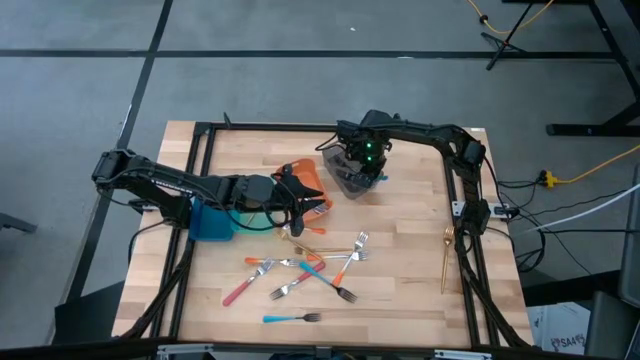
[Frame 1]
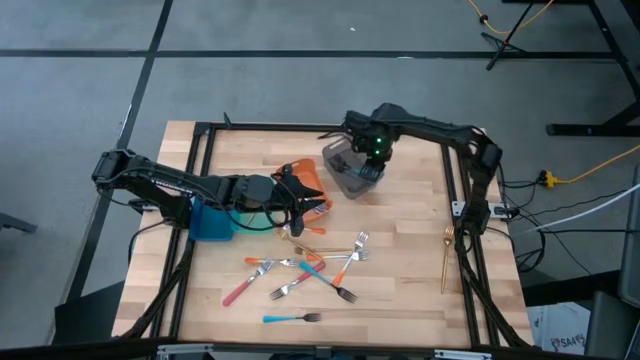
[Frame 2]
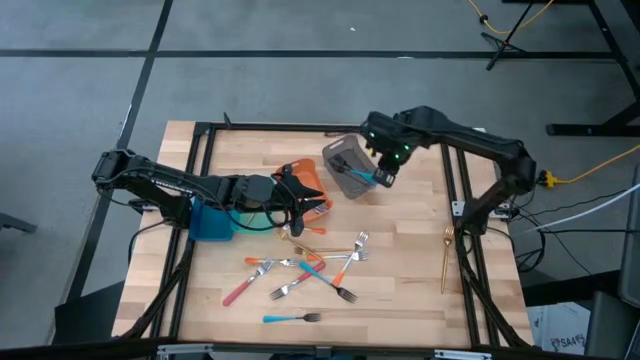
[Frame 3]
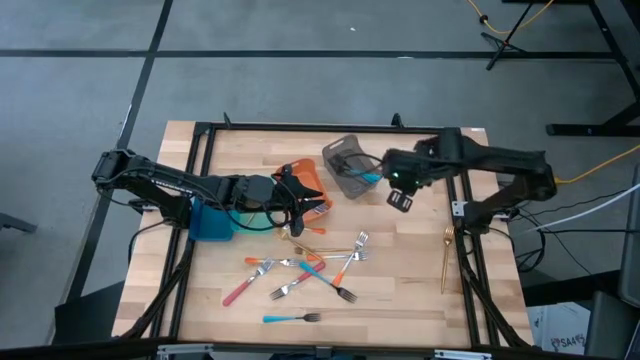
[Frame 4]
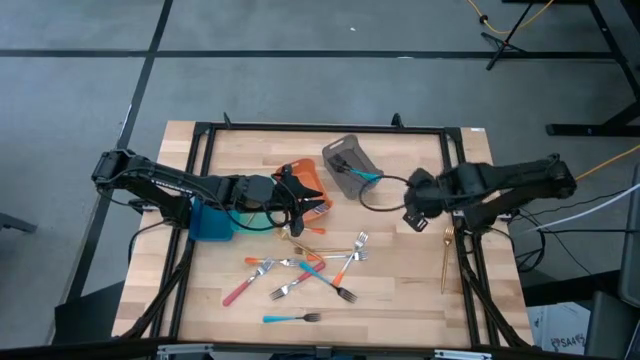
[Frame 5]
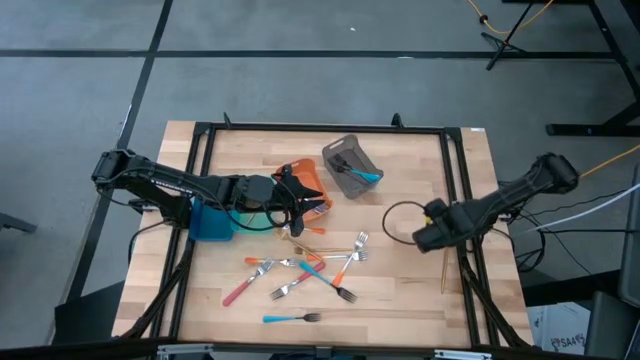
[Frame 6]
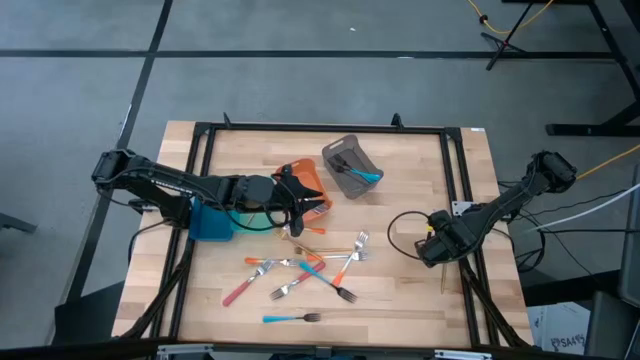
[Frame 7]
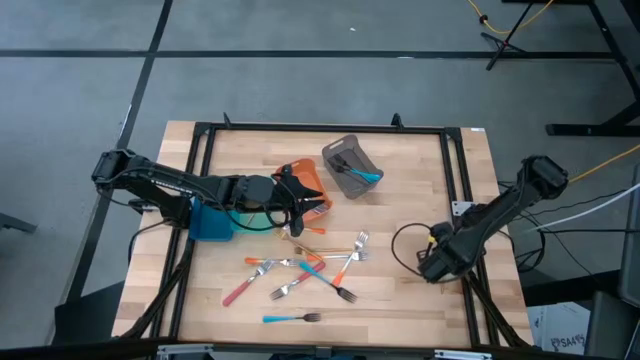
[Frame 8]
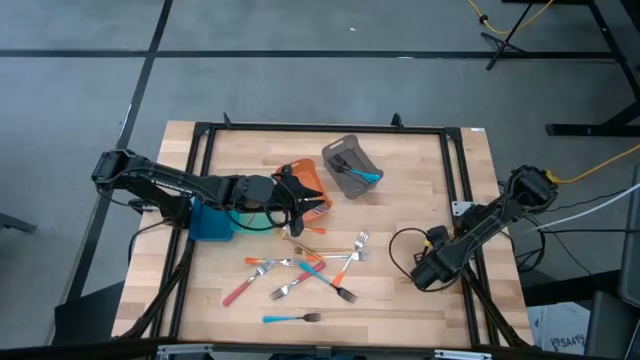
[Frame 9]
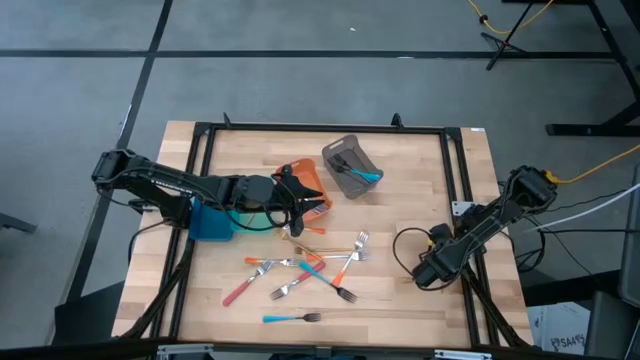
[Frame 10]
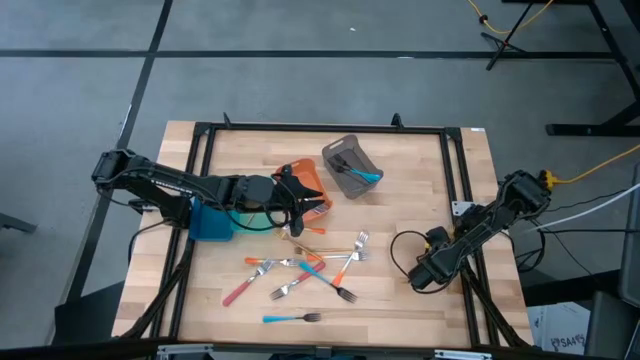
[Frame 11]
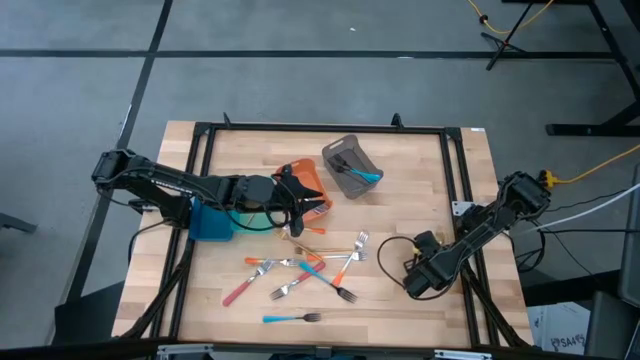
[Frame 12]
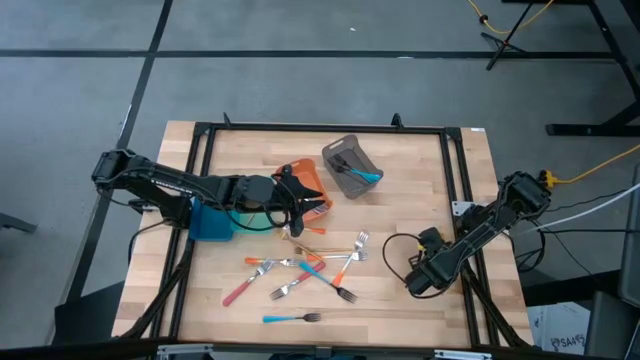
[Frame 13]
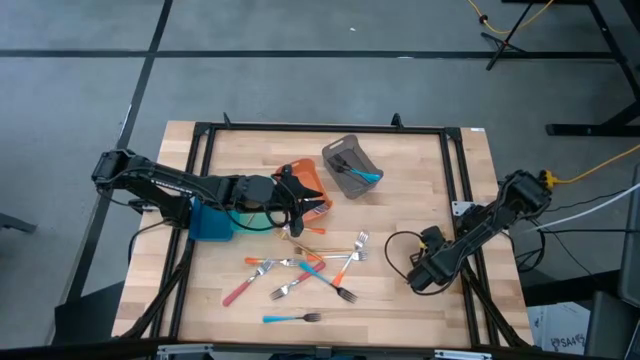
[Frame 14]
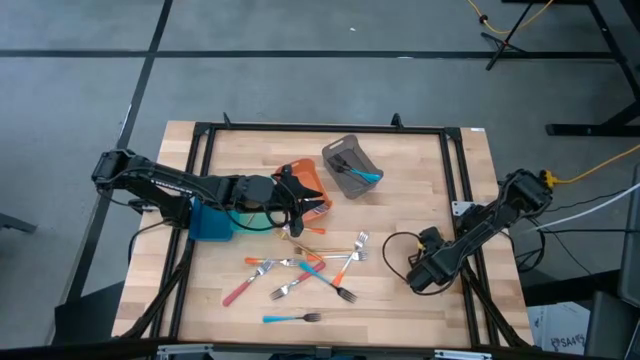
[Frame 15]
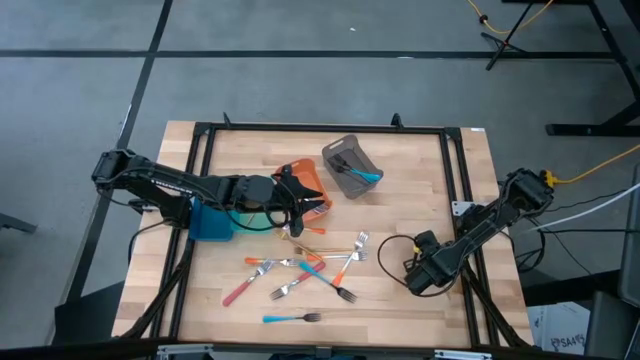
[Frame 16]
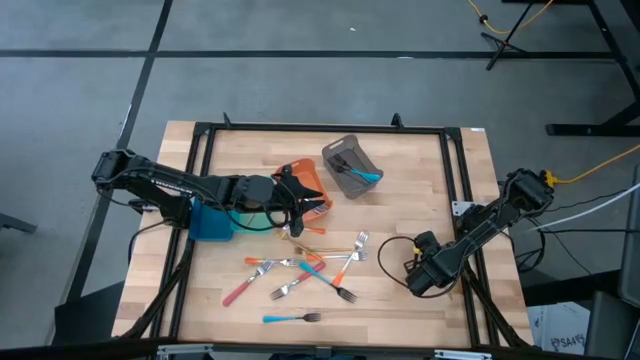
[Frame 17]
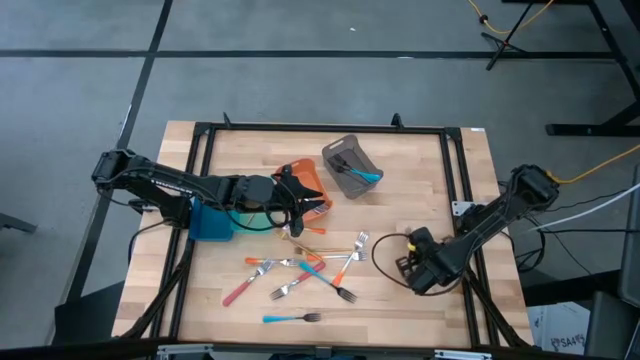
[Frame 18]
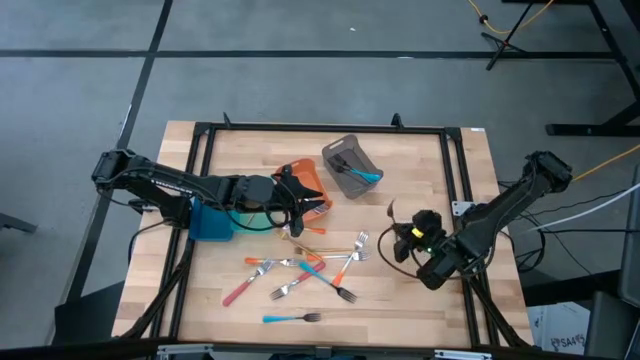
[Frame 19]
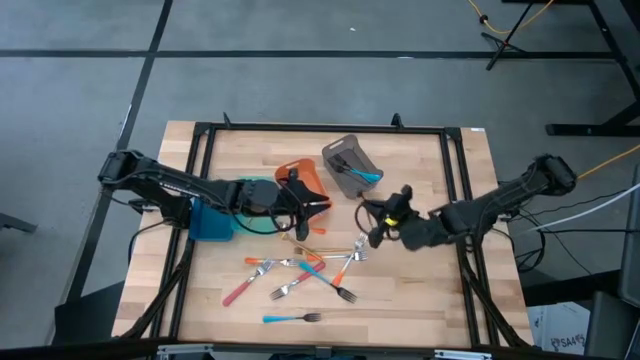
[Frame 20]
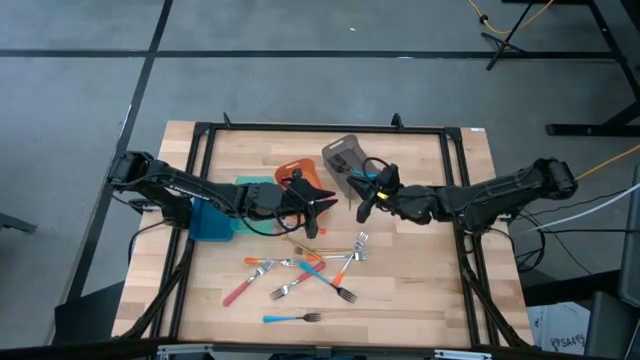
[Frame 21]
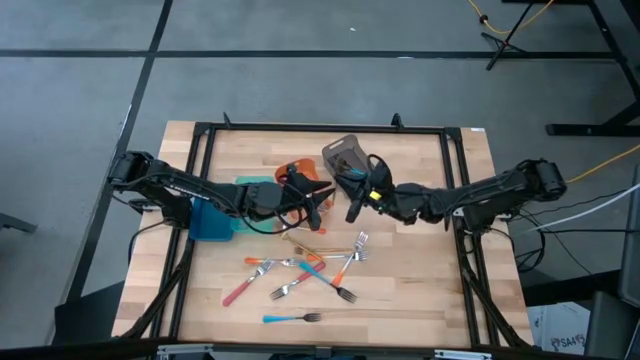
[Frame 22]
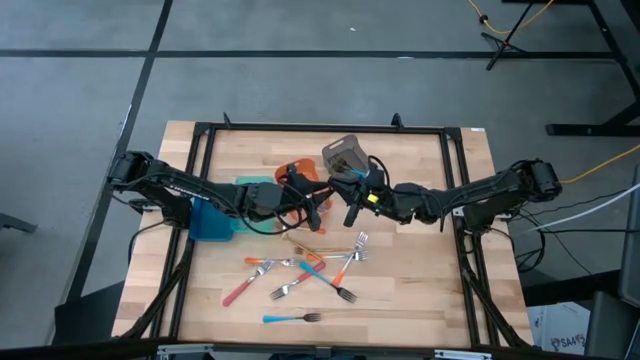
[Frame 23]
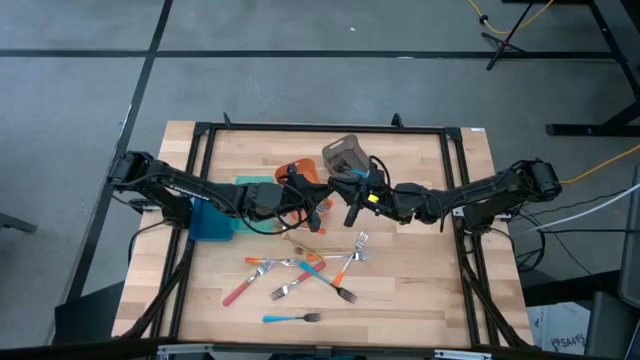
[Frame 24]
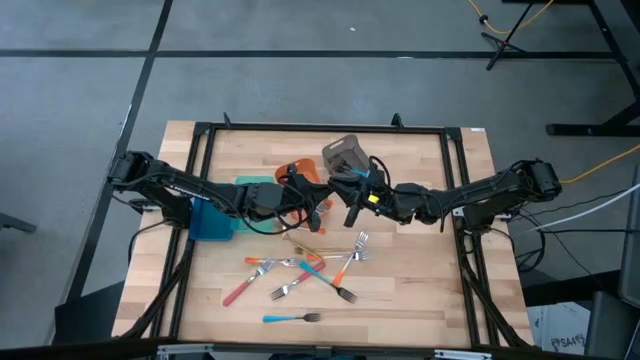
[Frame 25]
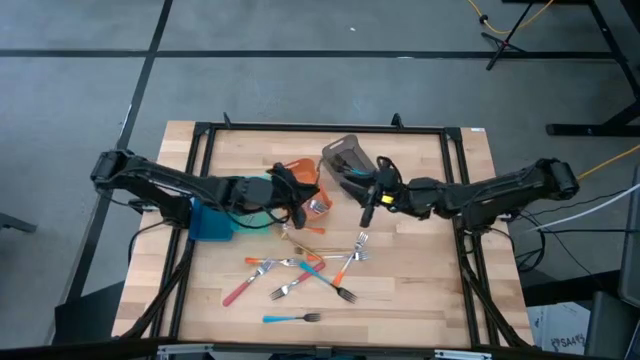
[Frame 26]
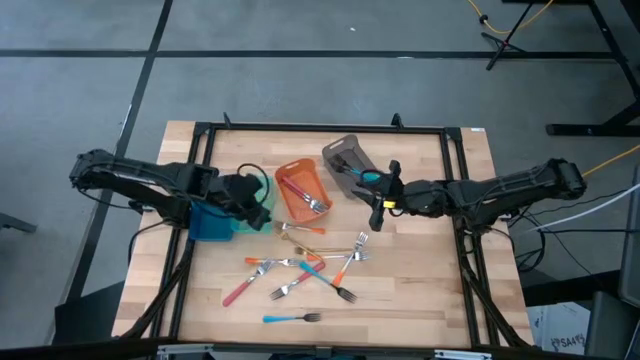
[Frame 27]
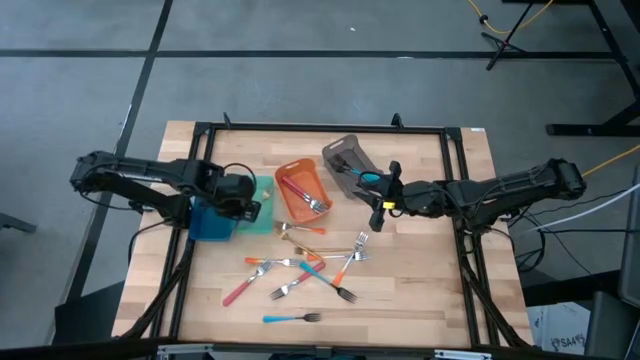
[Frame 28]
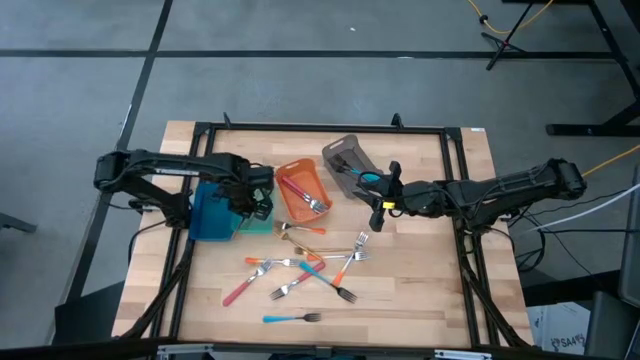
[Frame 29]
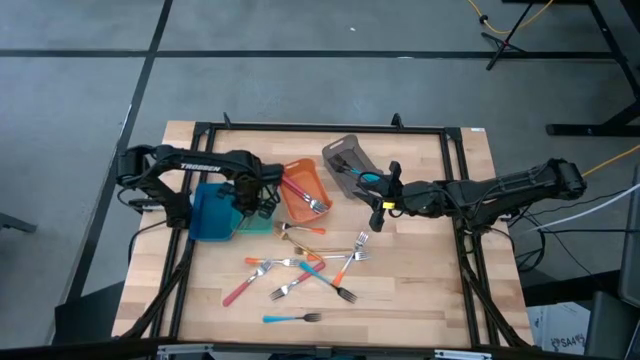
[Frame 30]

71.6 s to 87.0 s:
Task: Sort silverware by color (type)
Put the gold fork into the light blue bin

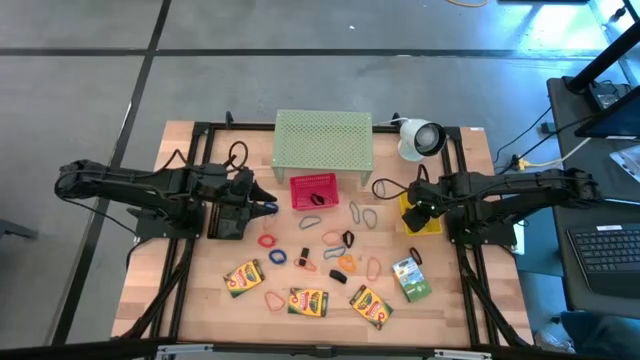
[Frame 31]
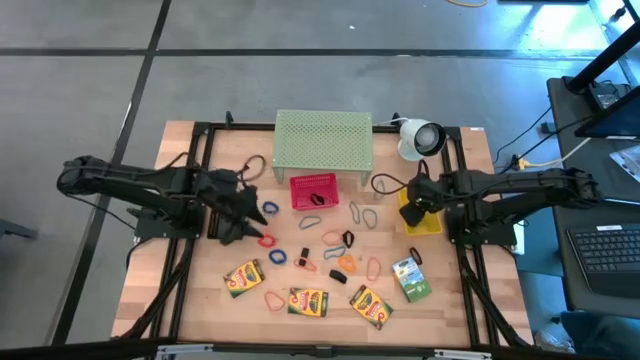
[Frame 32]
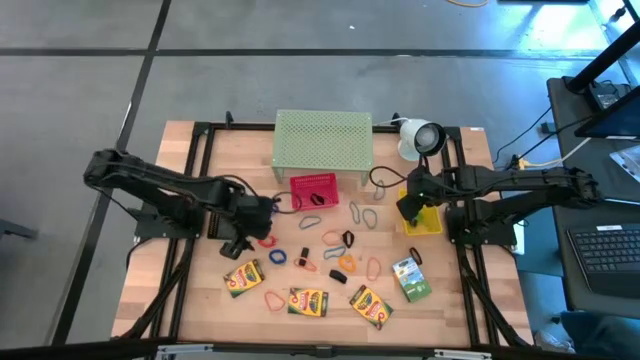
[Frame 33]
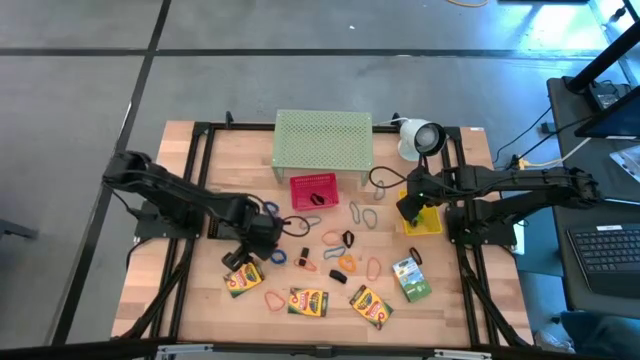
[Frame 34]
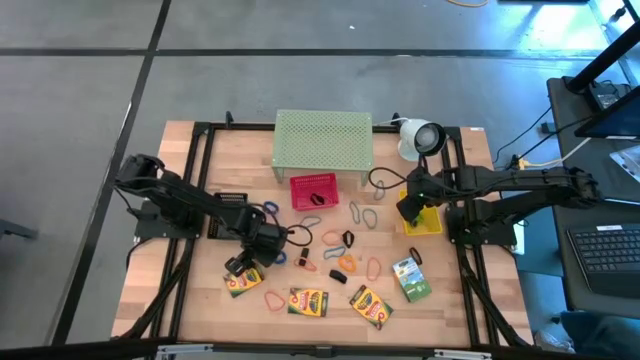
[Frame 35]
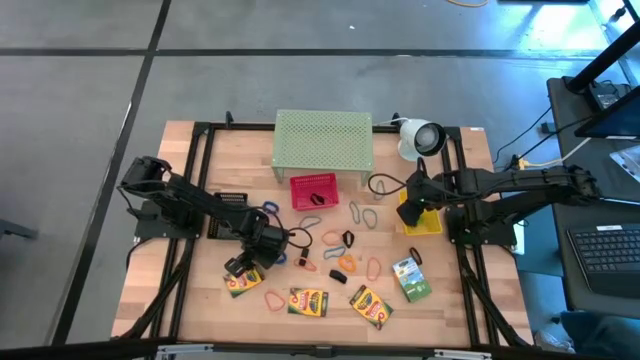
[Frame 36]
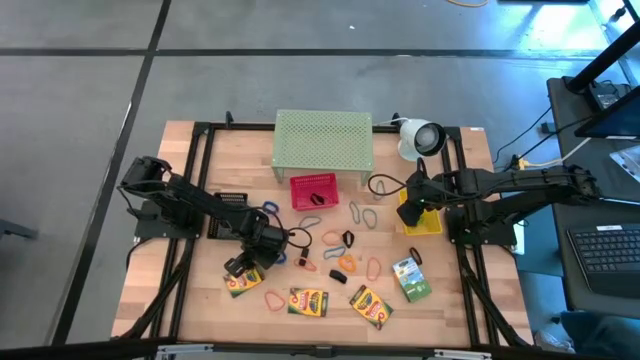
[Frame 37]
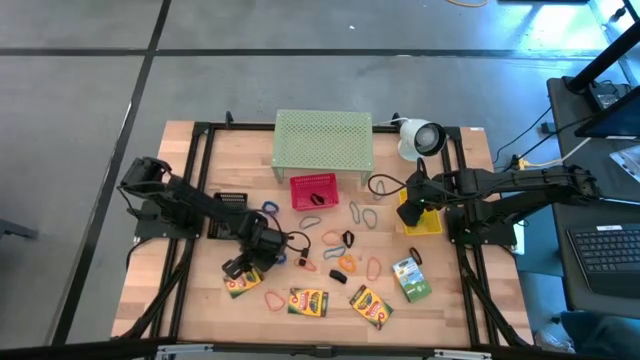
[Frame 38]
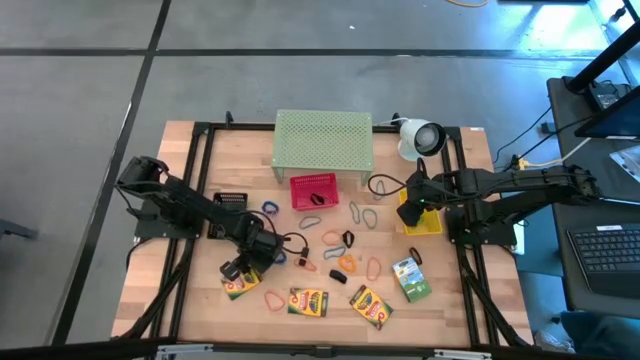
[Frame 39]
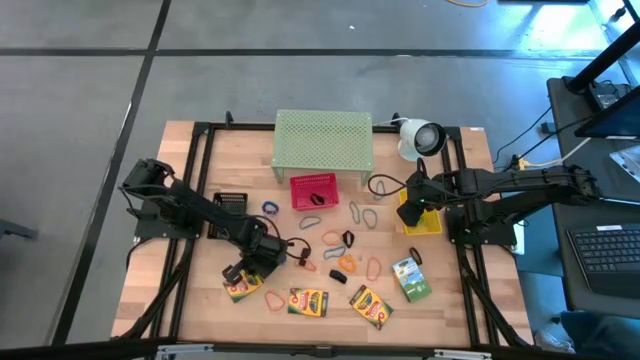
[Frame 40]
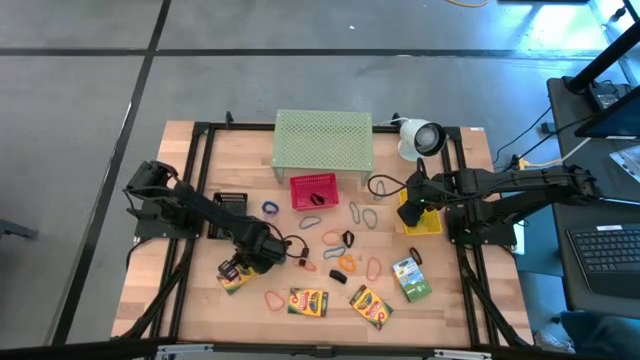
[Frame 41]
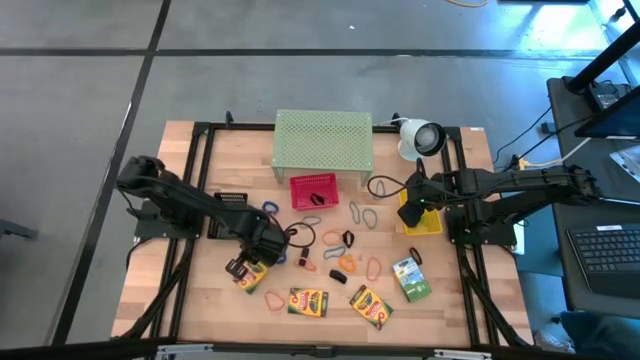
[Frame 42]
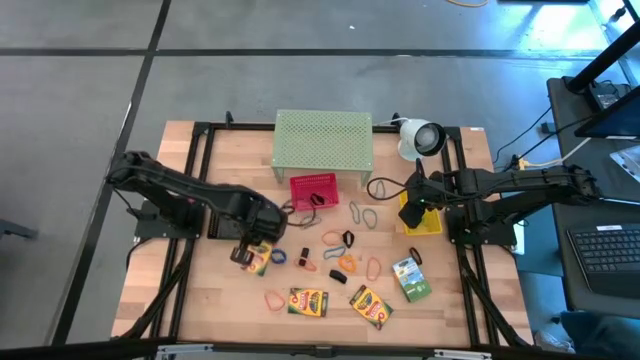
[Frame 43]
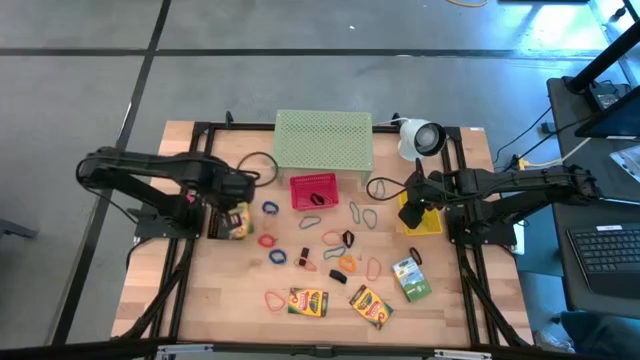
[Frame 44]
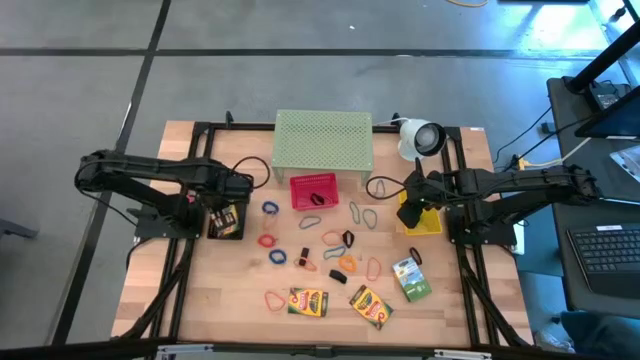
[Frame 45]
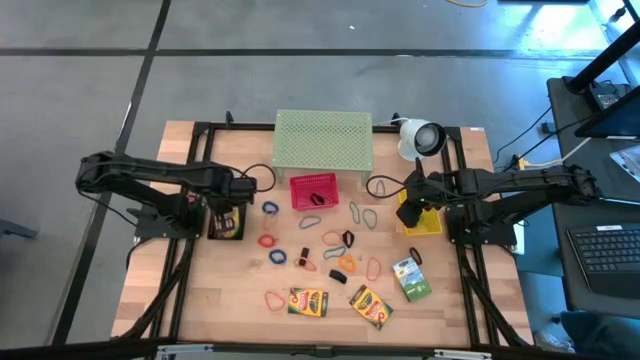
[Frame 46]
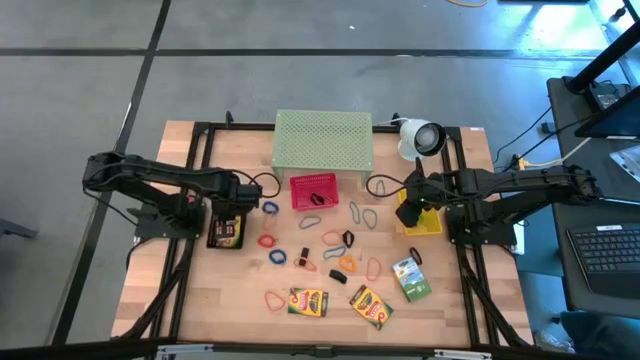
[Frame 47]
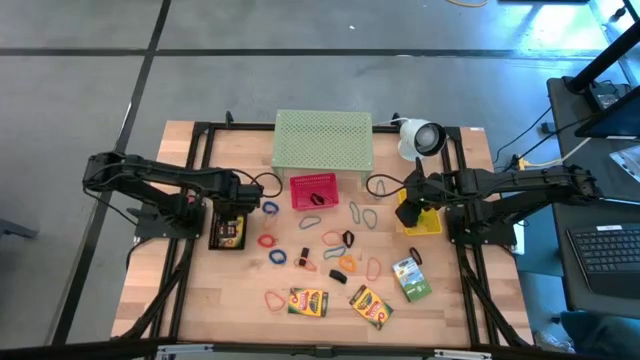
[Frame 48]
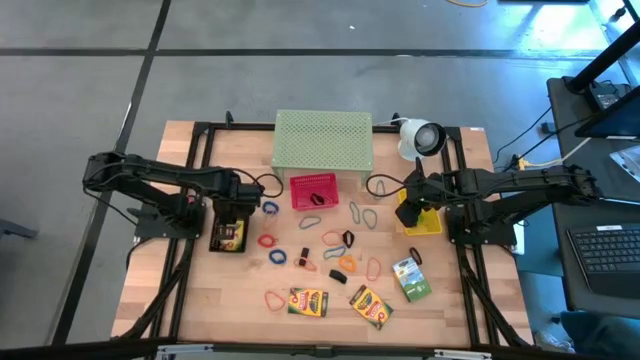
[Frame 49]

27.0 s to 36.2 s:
Task: Pick & Place Office Desk Supplies
Put the yellow crayon box into the black bin
